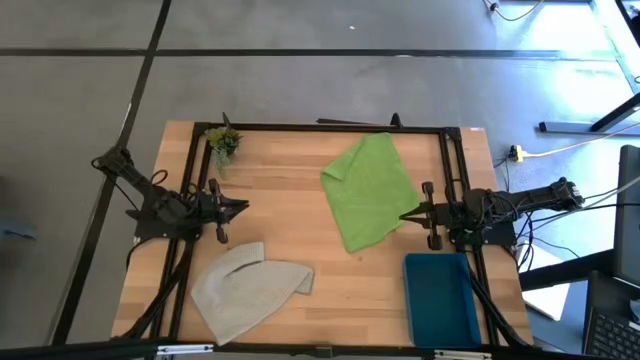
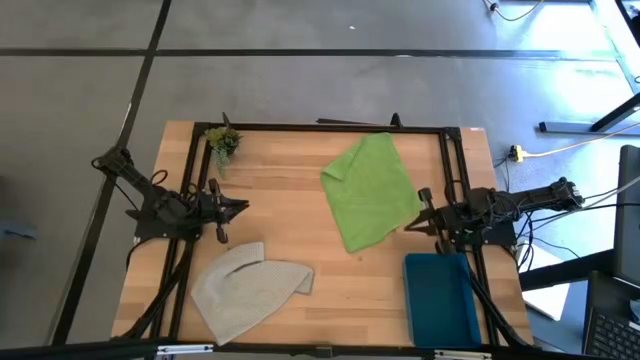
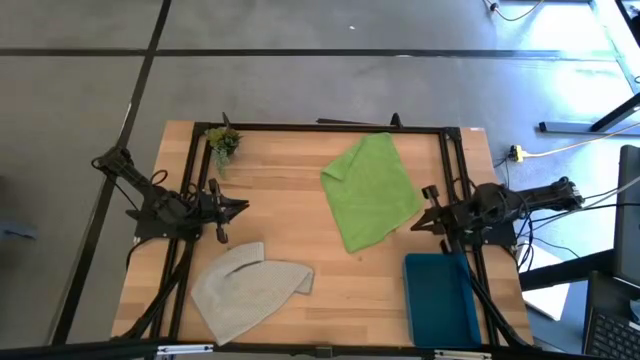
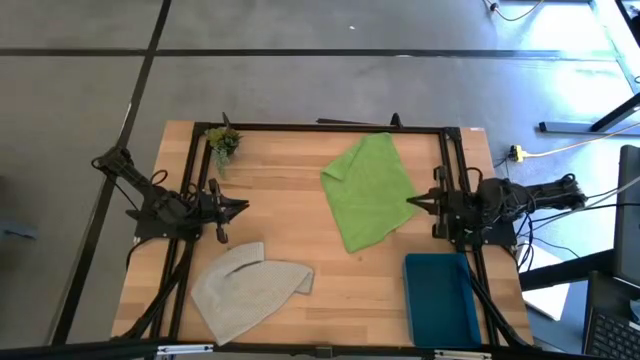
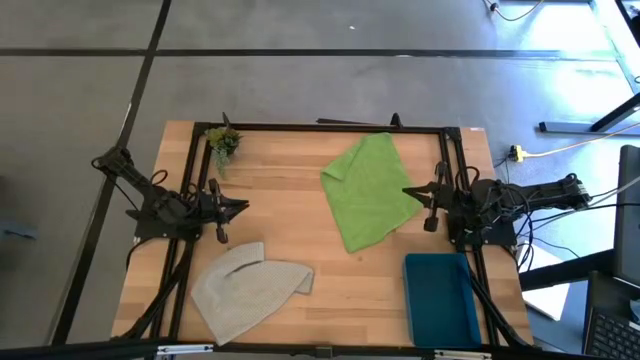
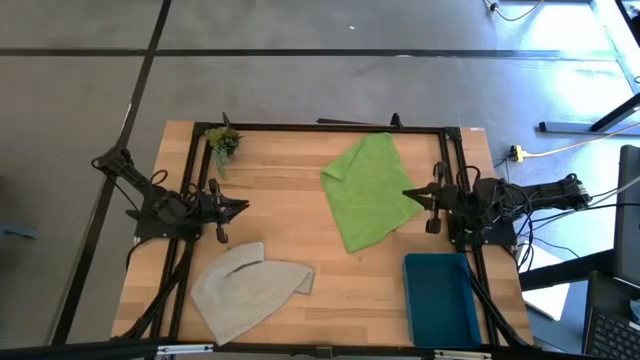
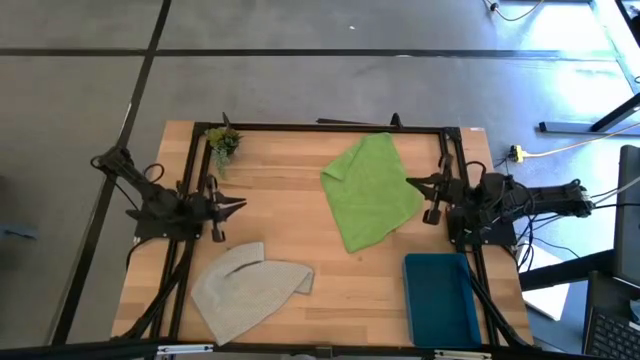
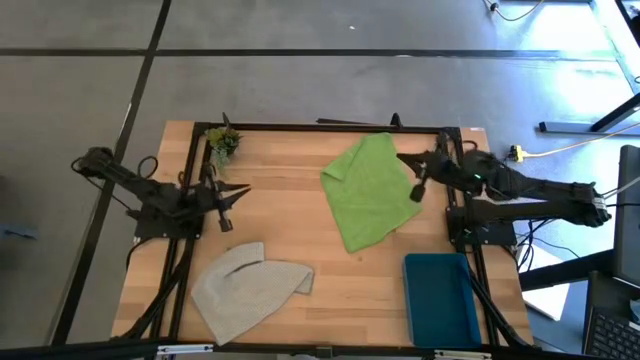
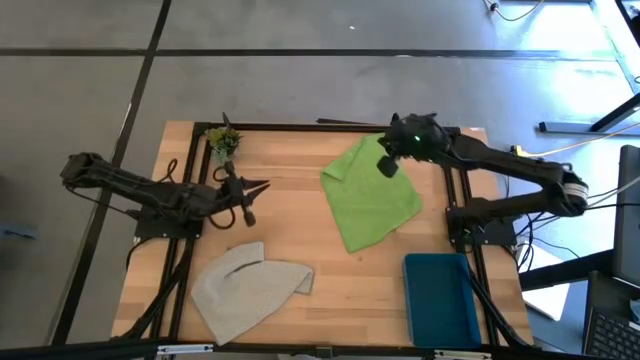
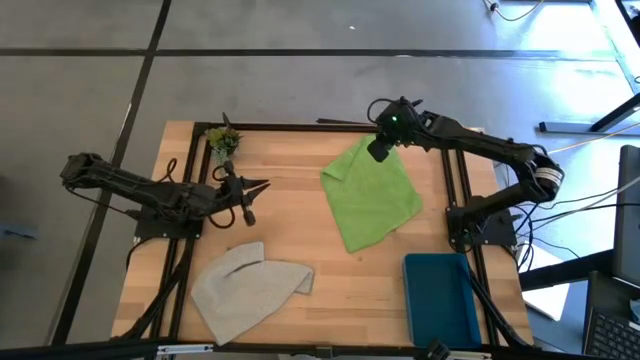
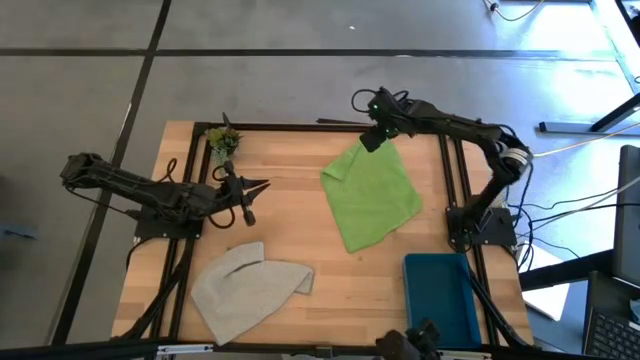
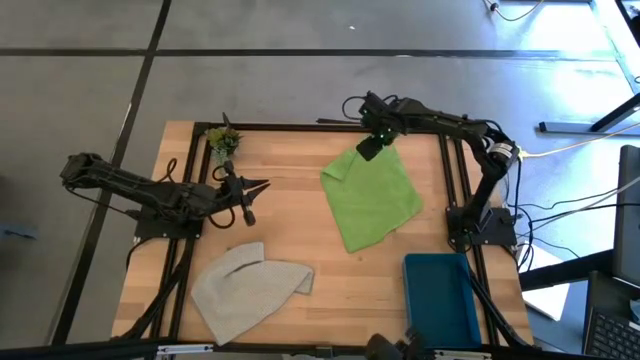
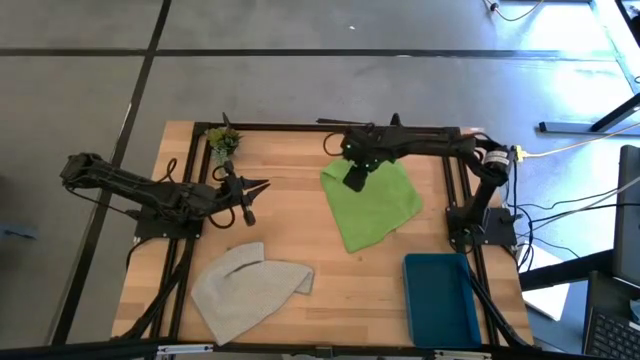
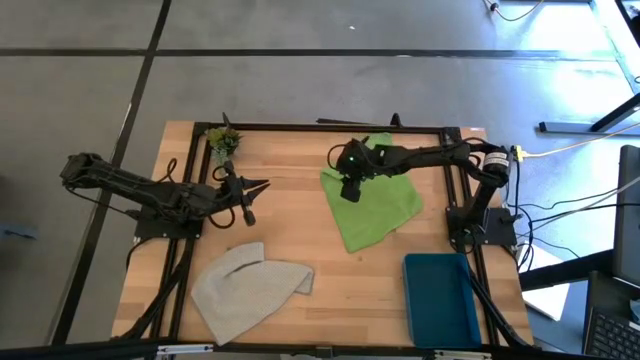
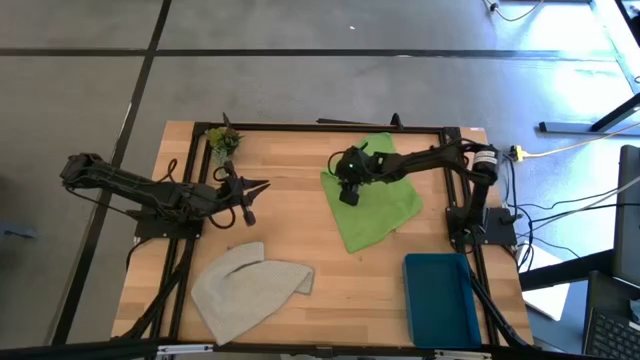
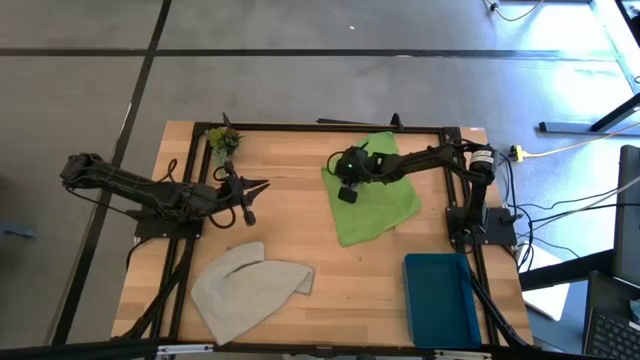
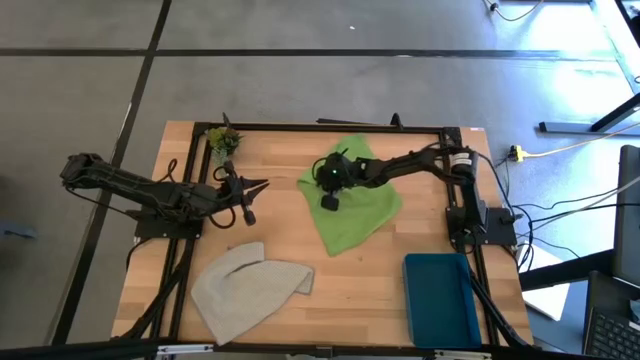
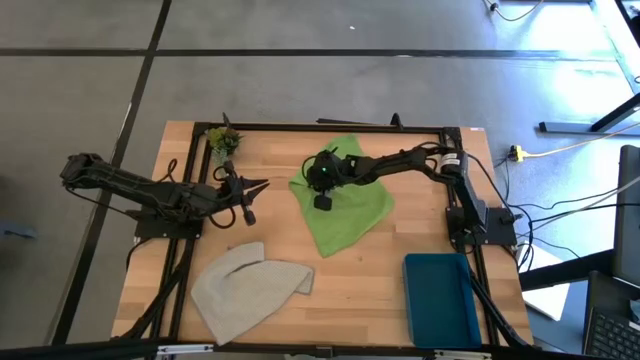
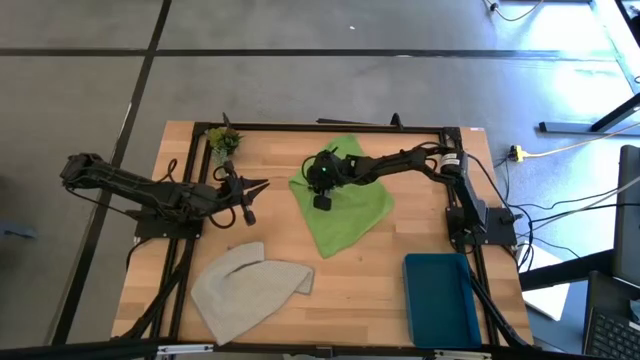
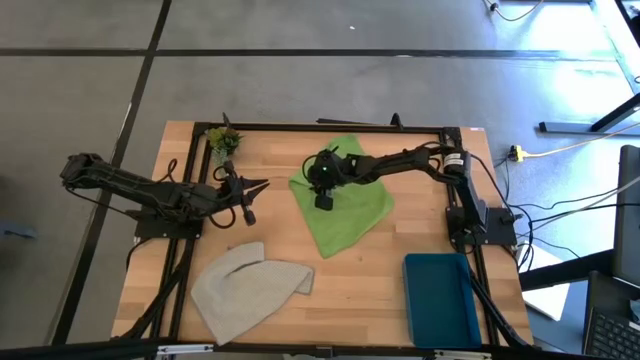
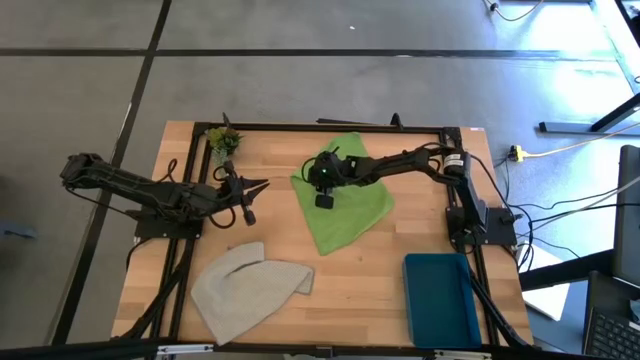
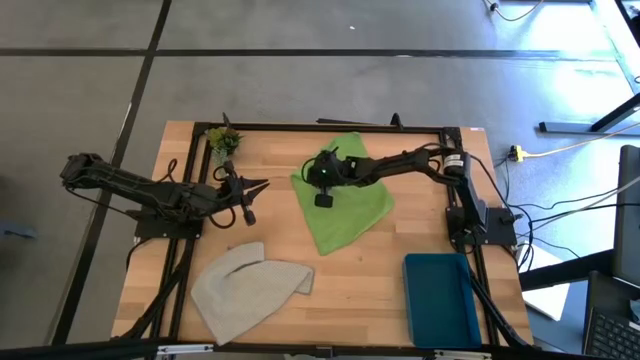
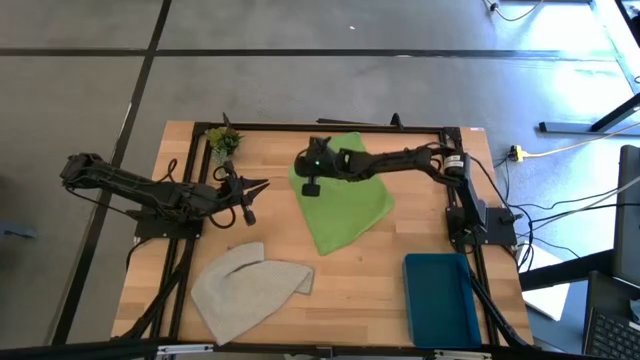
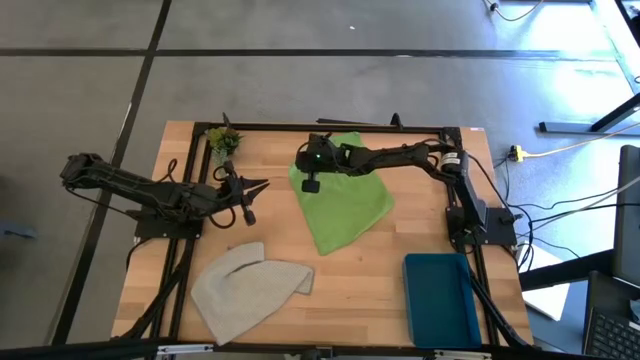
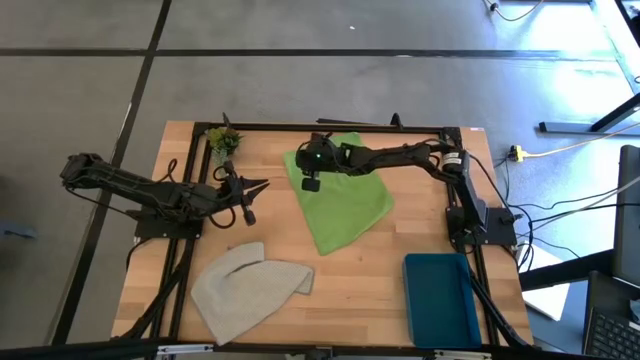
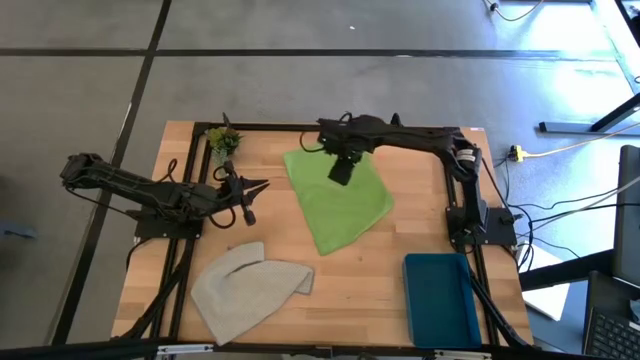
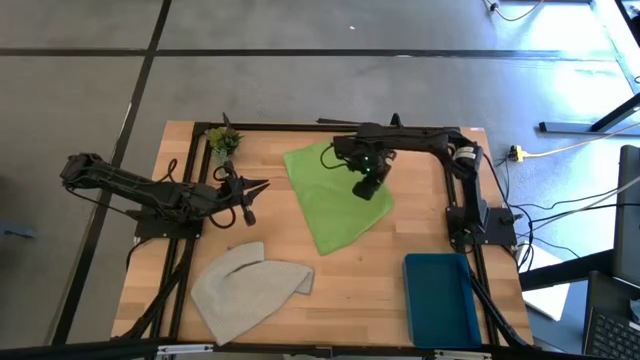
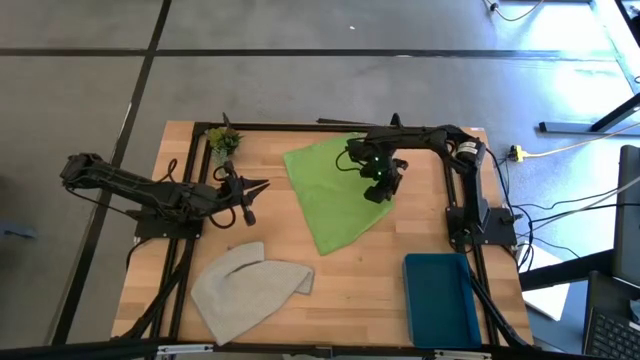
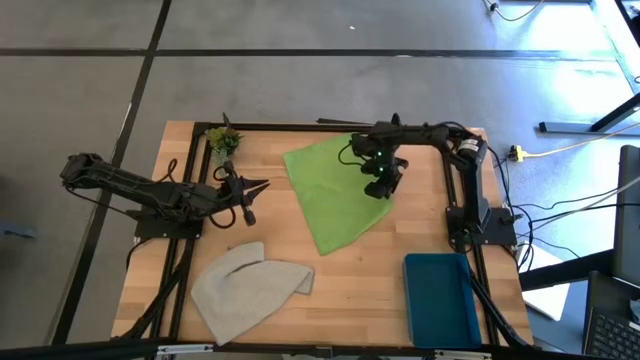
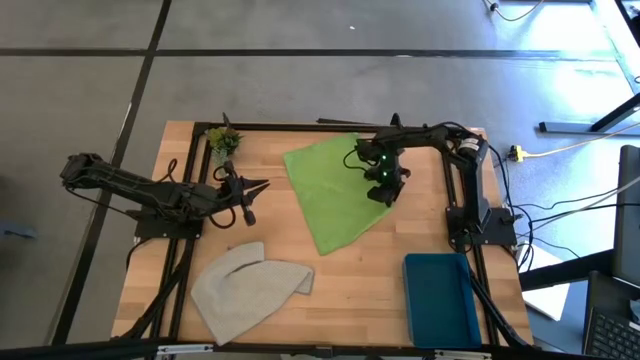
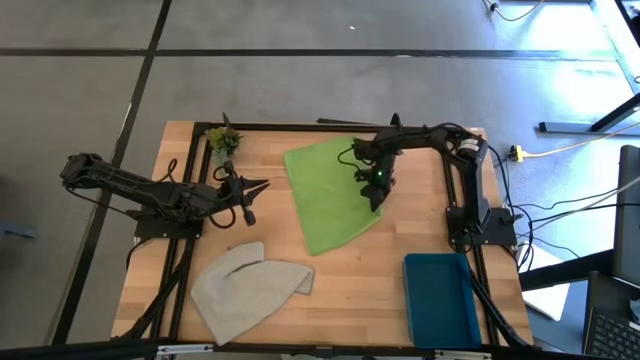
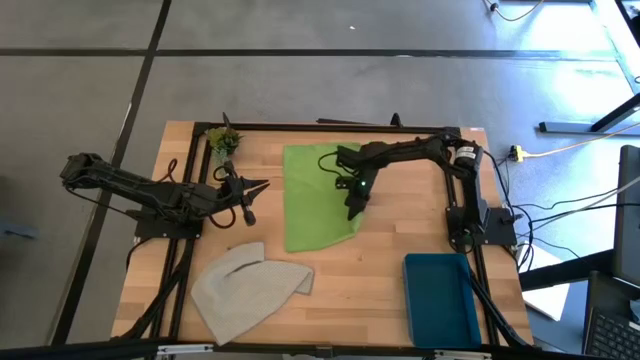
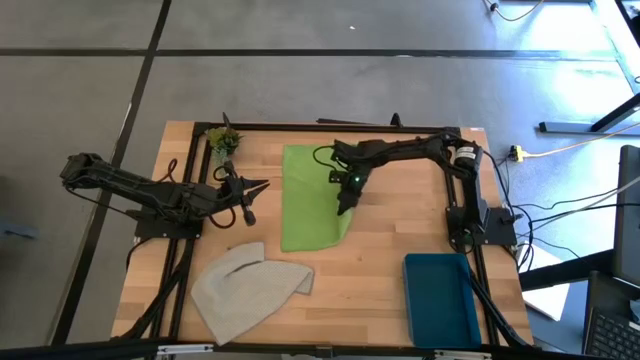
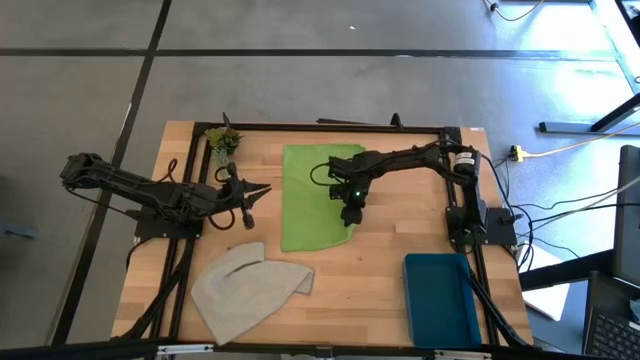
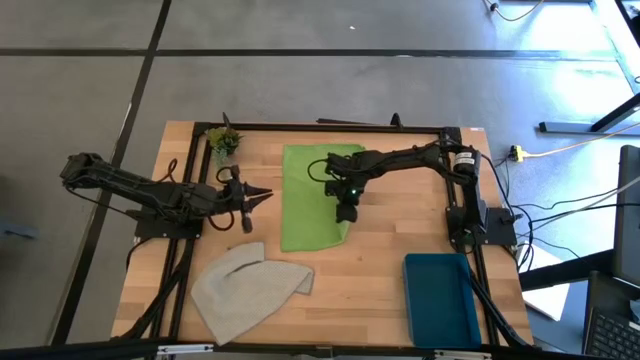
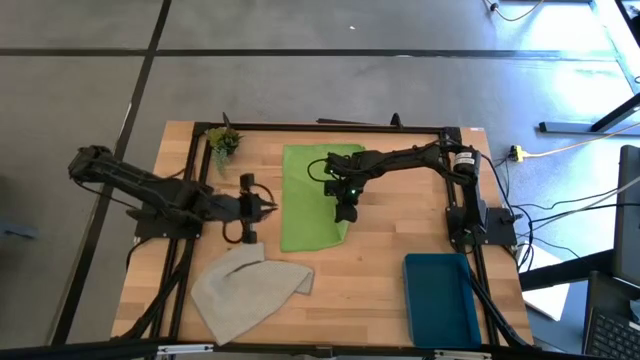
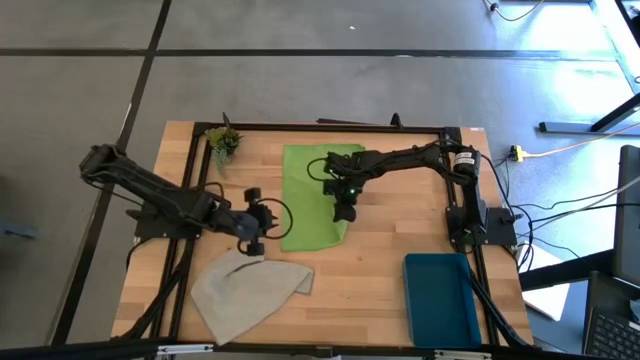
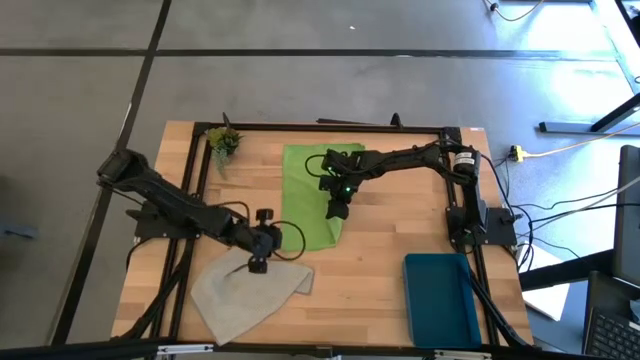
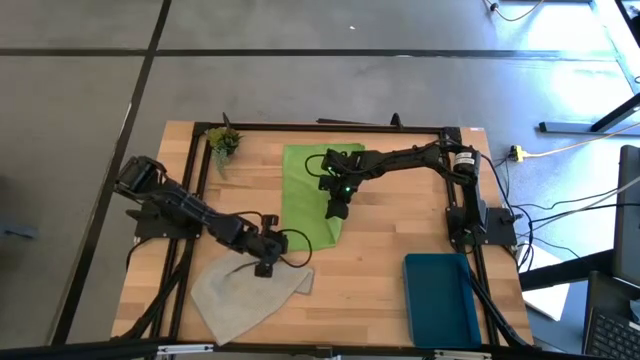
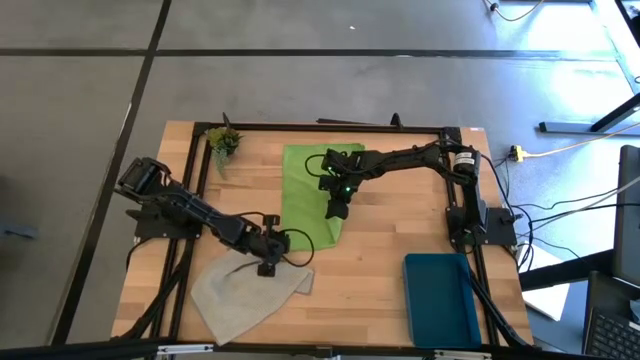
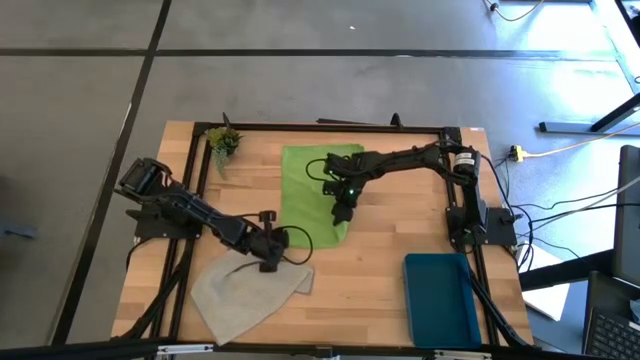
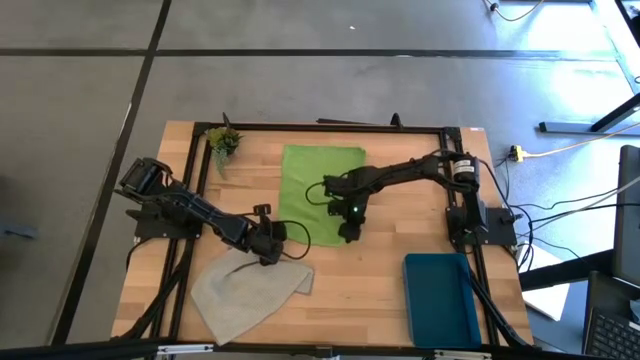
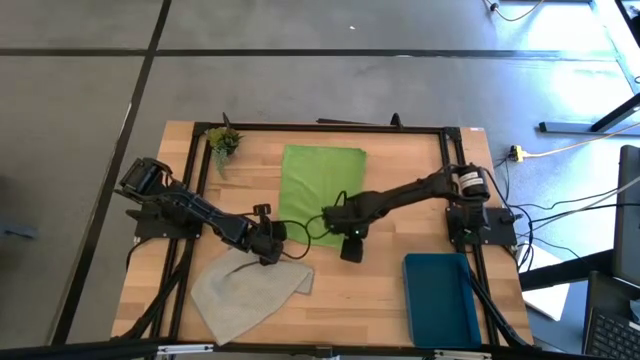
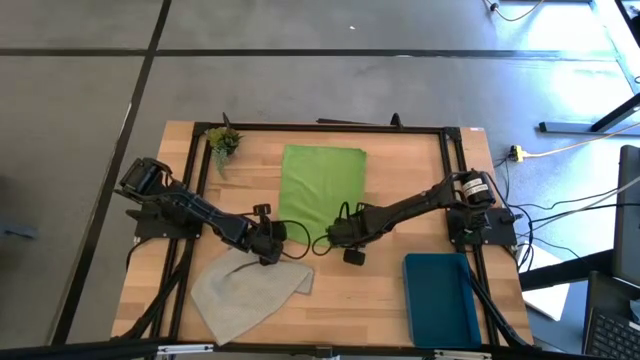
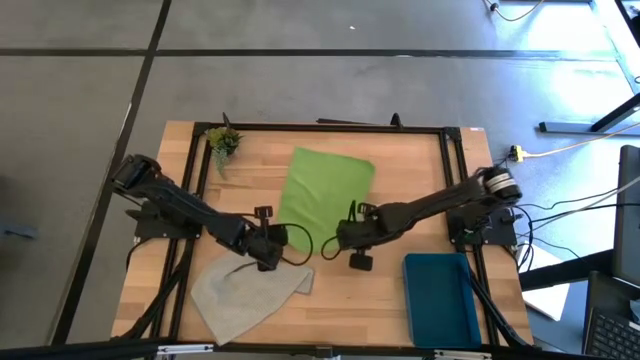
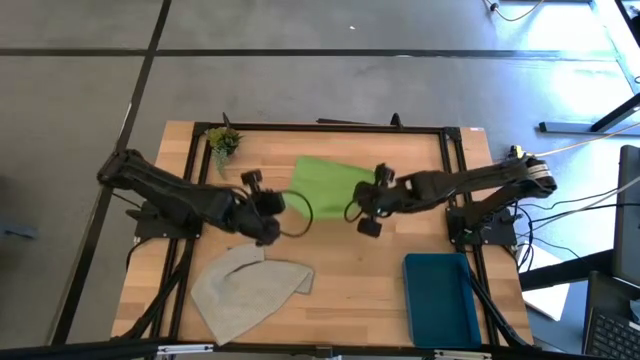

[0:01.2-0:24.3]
Task: Roll microfiber towels into tight, uniform cylinder then place into a basket
Roll the green microfiber cloth
